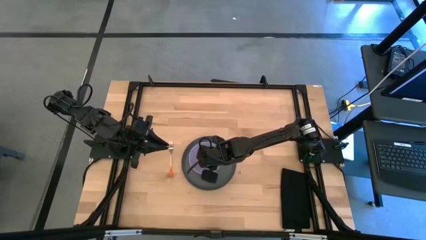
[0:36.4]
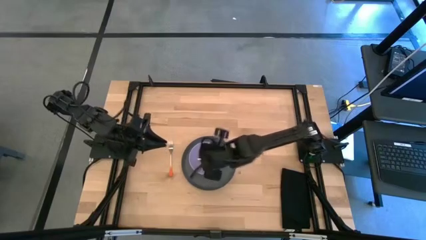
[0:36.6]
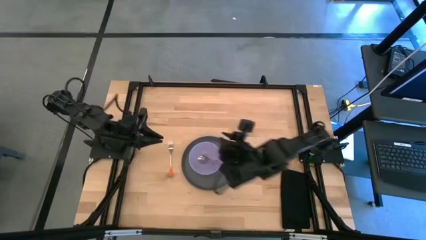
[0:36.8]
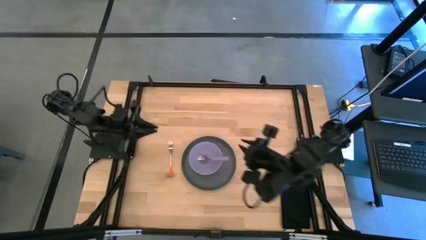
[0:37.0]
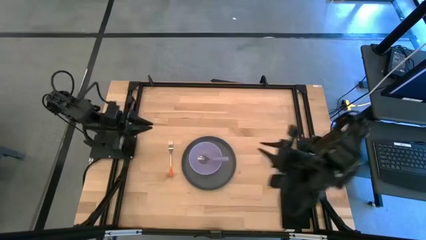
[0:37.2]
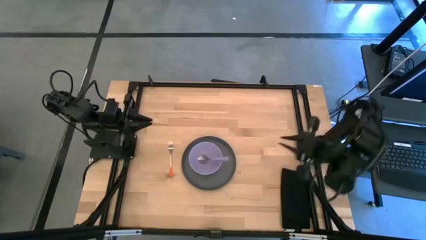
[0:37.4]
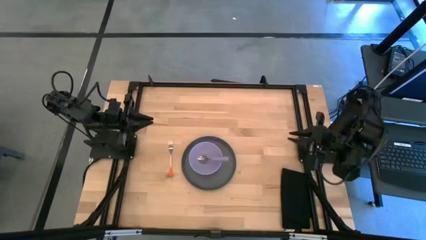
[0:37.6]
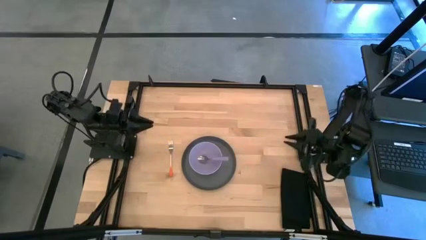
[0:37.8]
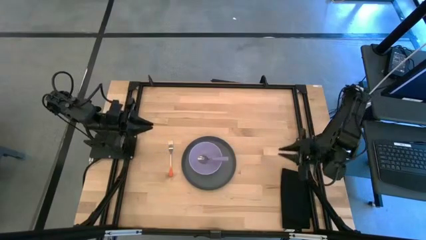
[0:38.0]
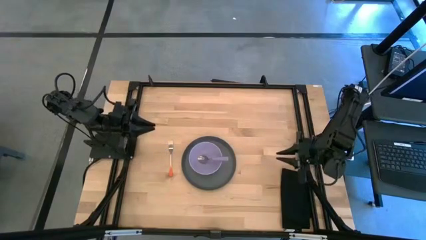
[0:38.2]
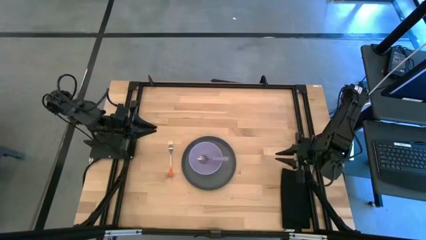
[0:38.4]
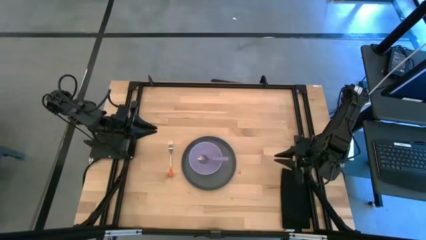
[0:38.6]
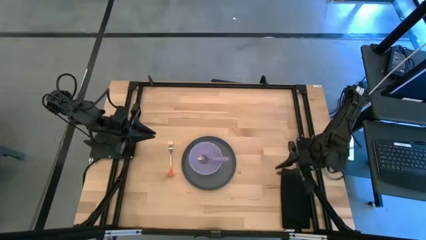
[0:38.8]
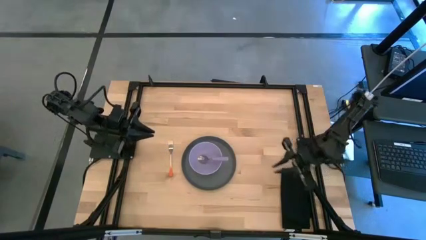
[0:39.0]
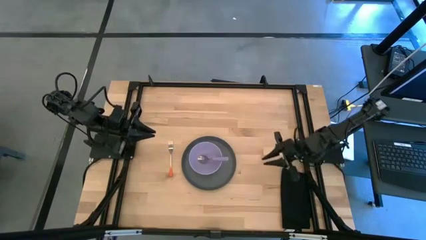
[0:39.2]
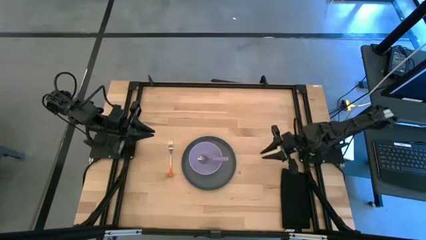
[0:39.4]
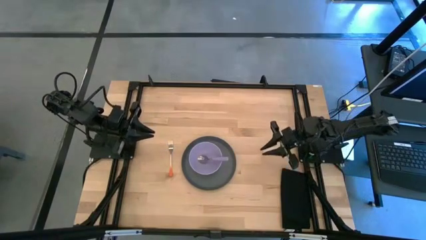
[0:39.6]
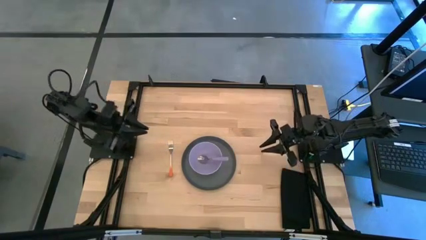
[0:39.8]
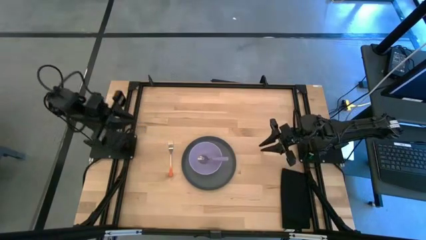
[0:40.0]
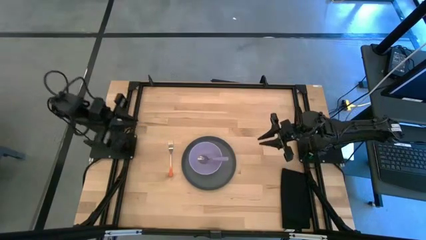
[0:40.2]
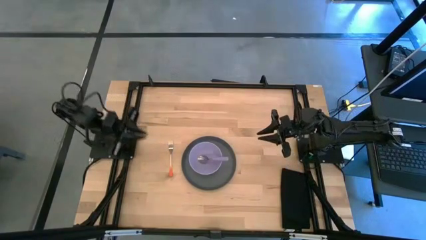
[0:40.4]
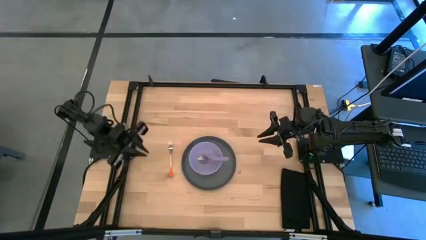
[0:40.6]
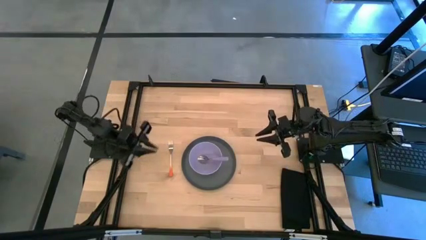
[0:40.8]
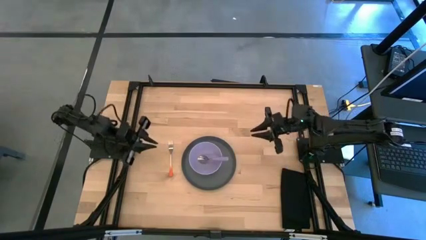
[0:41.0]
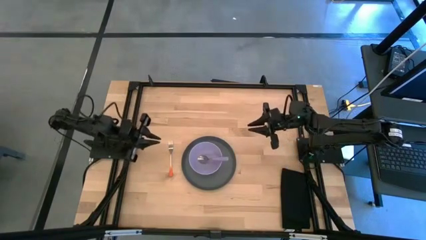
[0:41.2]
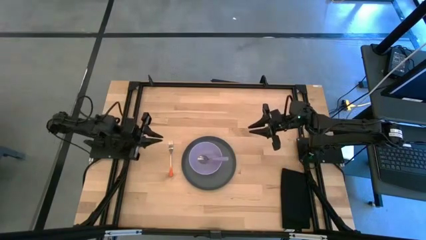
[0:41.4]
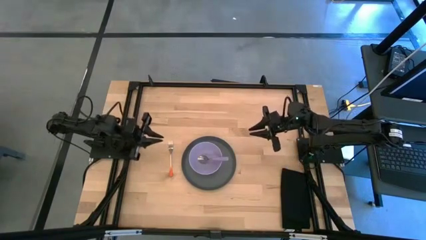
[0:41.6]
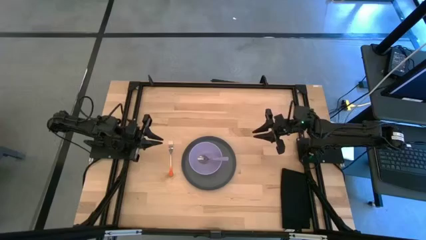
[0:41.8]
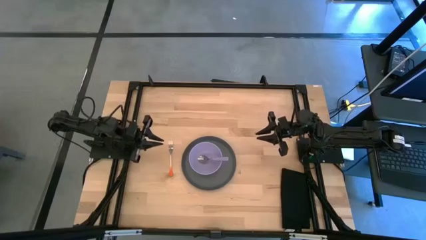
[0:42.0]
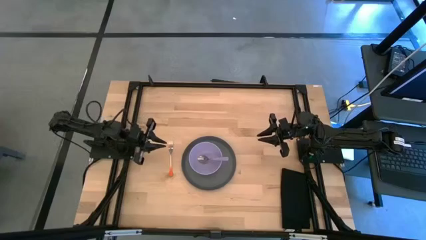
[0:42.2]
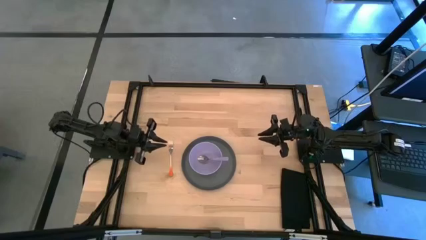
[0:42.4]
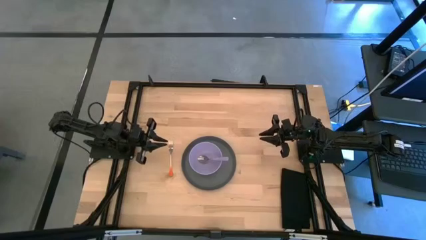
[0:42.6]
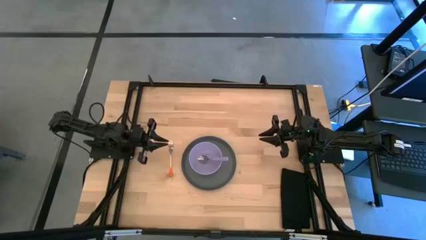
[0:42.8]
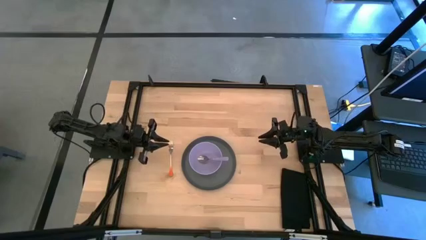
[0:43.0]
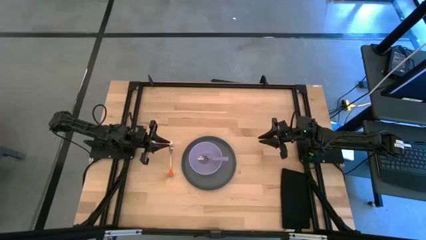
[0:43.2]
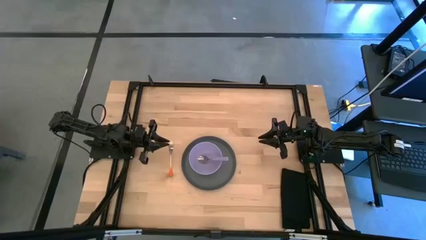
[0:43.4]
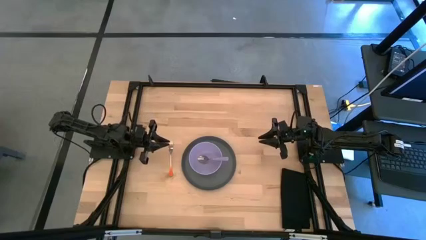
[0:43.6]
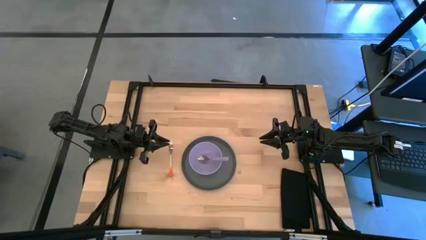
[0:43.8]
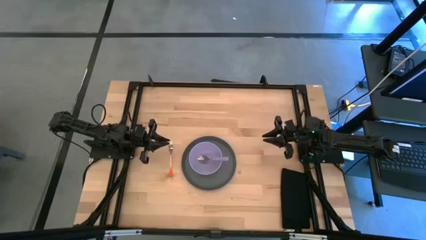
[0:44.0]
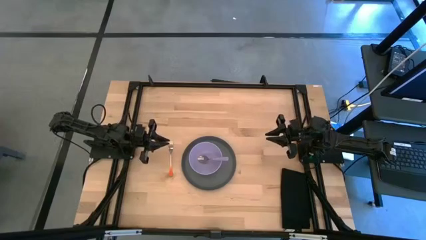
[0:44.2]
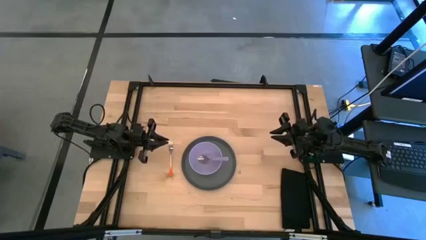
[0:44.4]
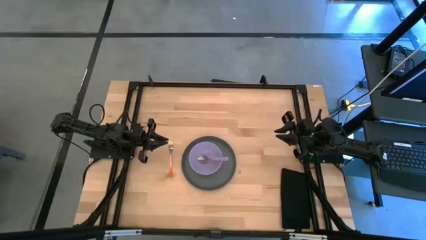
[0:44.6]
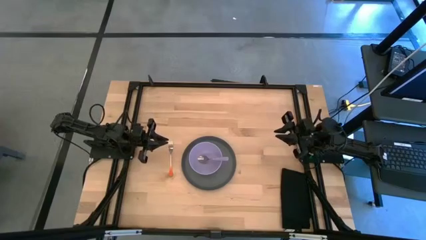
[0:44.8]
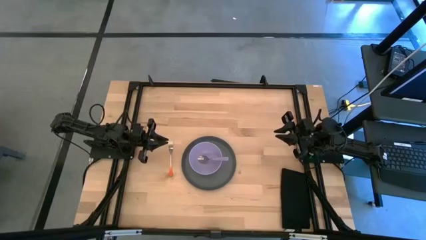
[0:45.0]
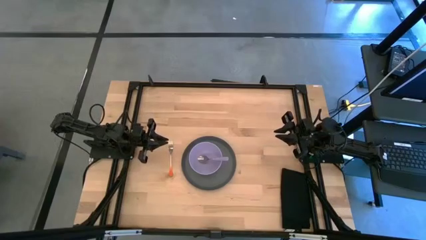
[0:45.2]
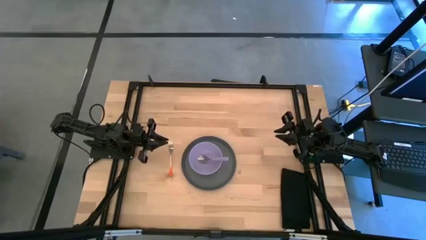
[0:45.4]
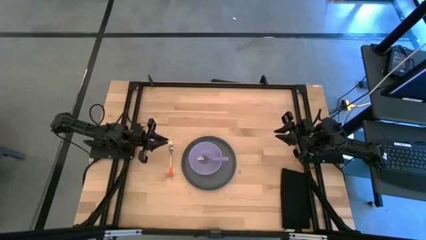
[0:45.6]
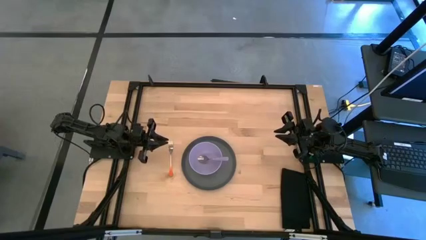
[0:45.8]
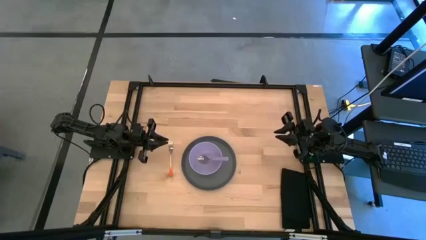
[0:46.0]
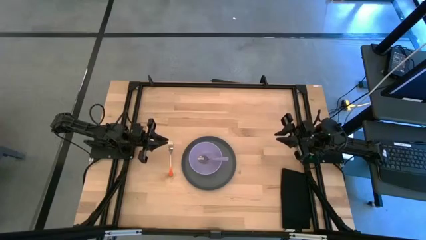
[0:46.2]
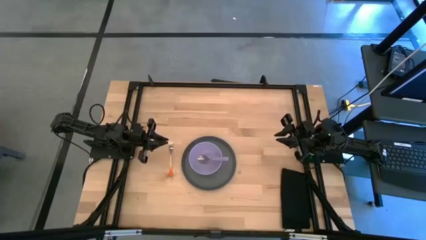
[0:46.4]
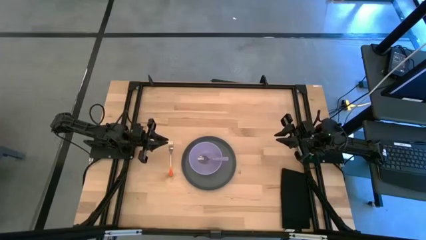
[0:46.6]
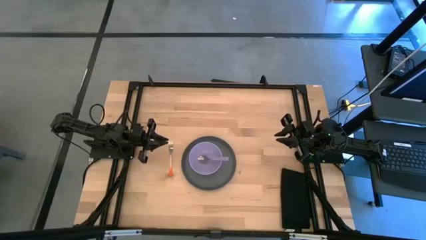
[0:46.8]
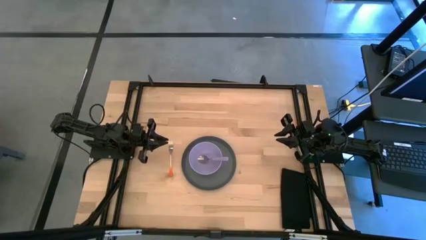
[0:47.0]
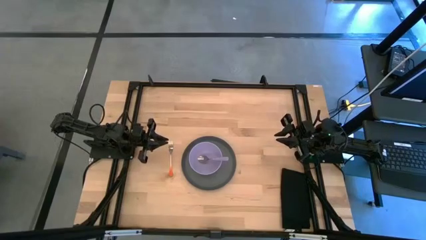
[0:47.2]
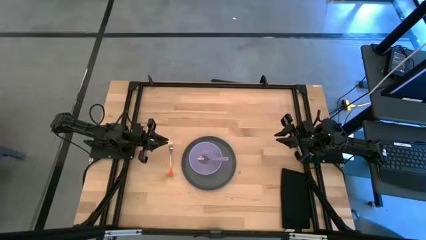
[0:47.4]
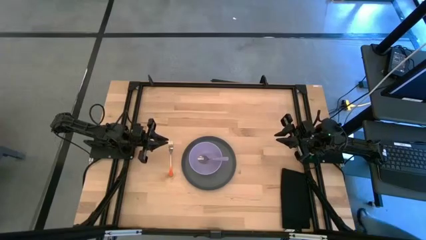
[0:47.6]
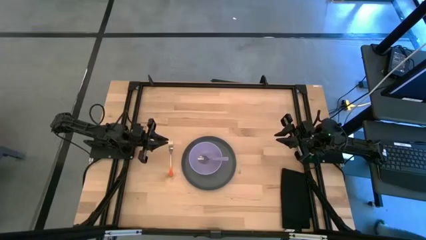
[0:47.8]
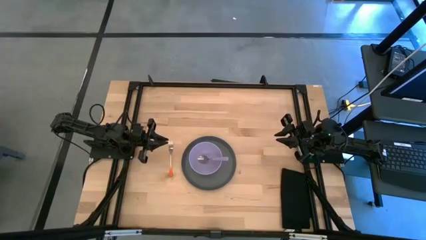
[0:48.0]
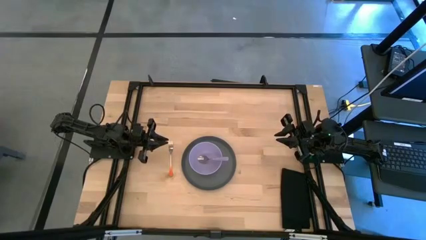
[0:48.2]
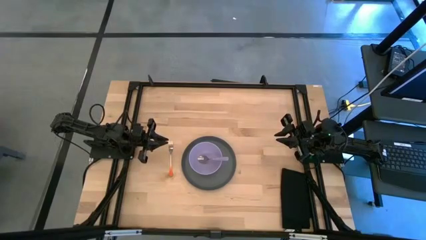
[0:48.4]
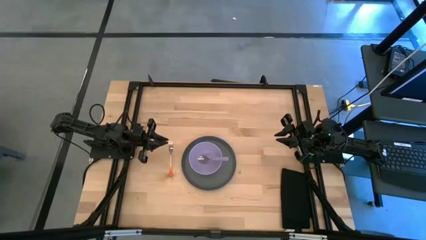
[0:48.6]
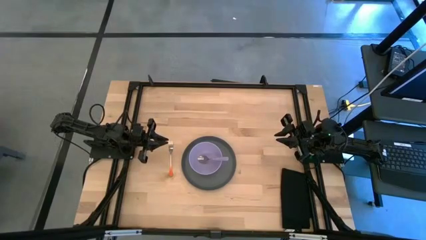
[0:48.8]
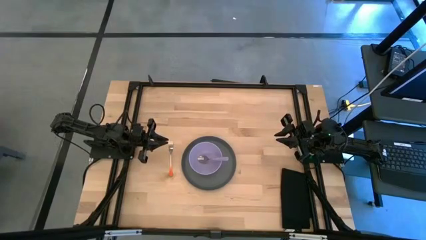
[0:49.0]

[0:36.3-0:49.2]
Task: Set table place
Return to Home Position
